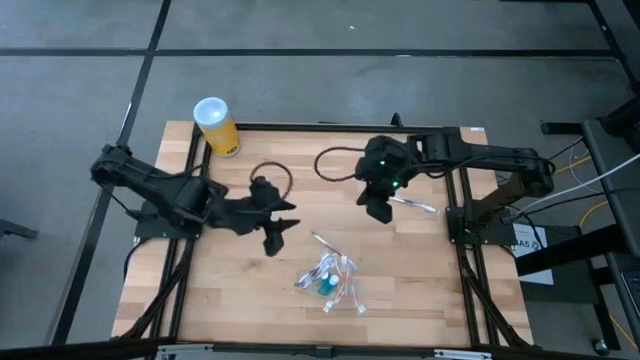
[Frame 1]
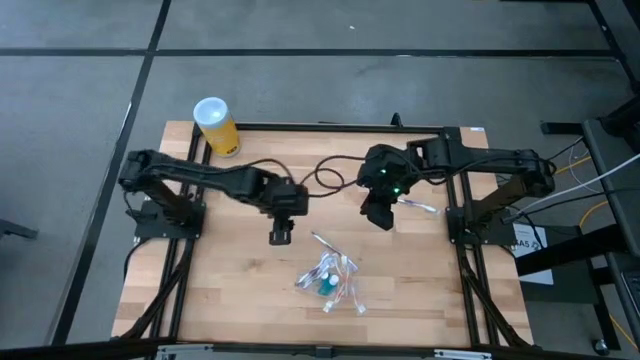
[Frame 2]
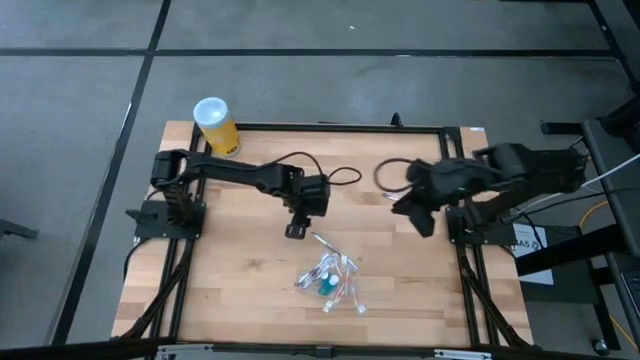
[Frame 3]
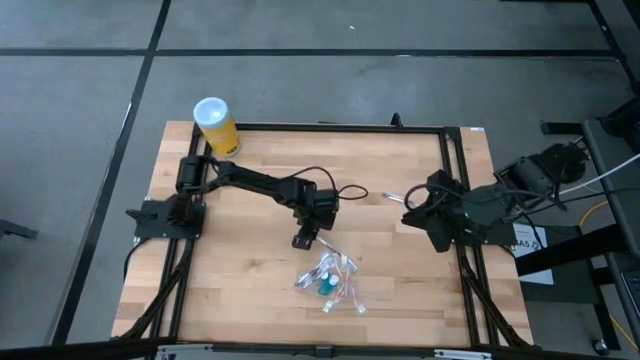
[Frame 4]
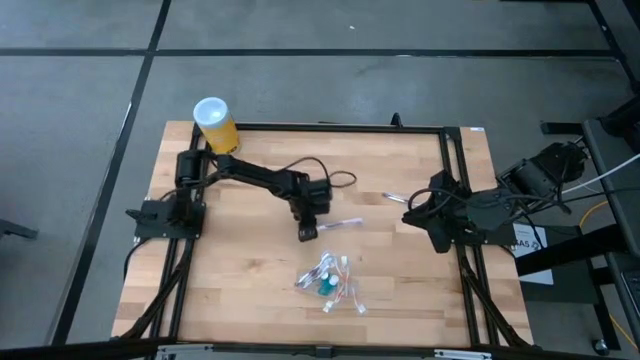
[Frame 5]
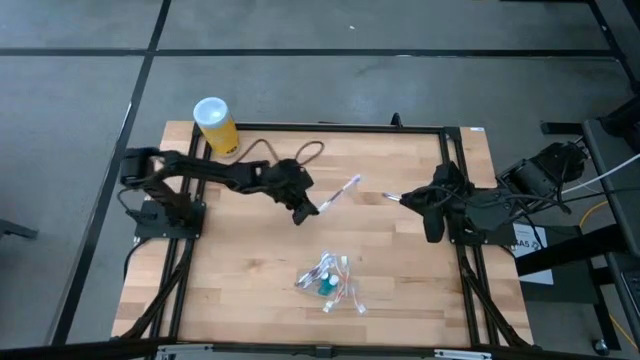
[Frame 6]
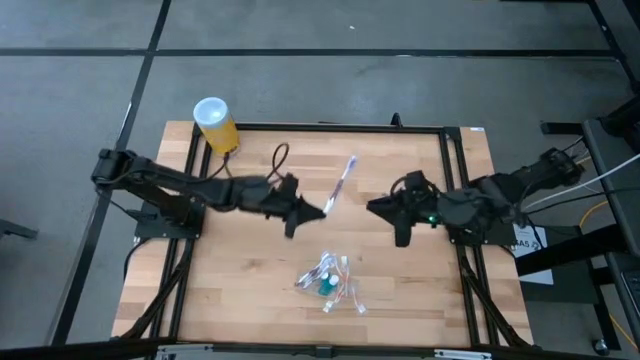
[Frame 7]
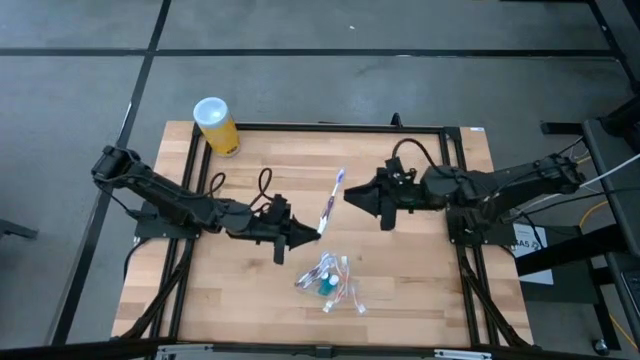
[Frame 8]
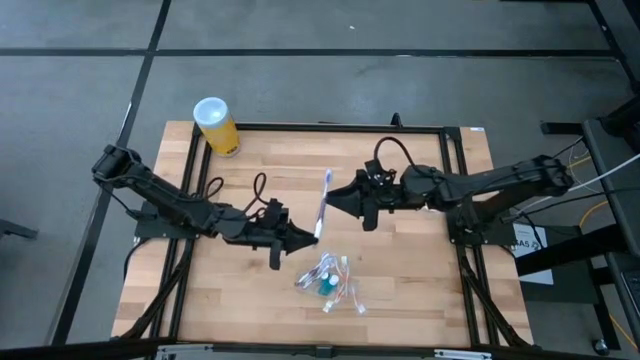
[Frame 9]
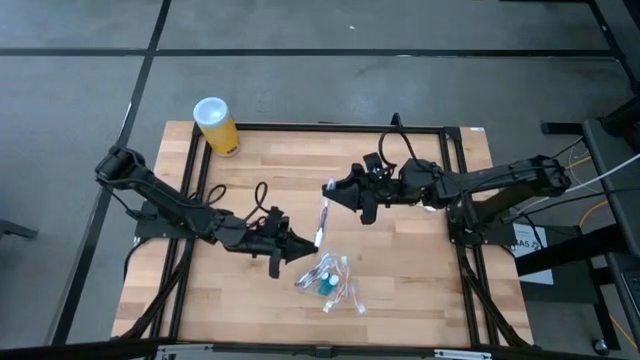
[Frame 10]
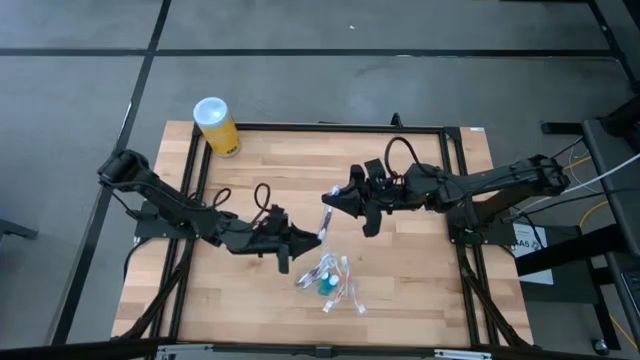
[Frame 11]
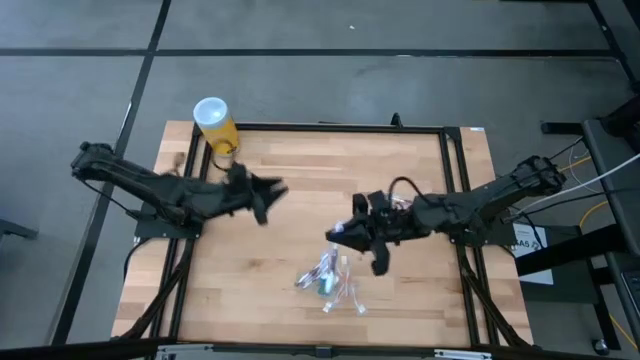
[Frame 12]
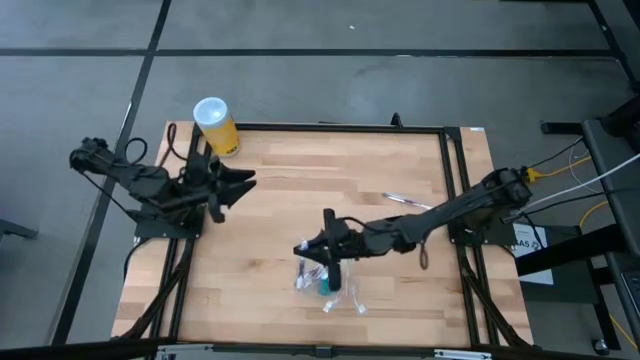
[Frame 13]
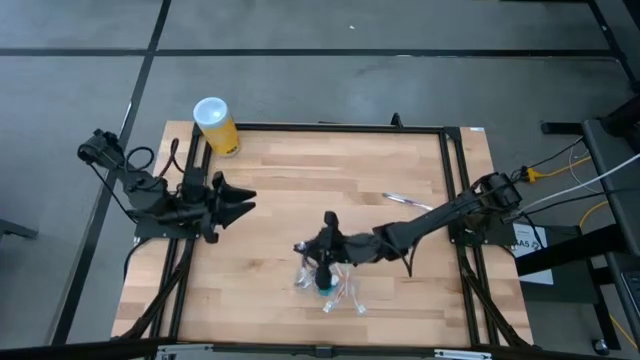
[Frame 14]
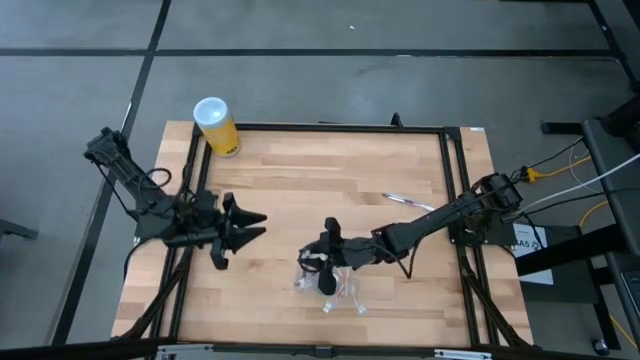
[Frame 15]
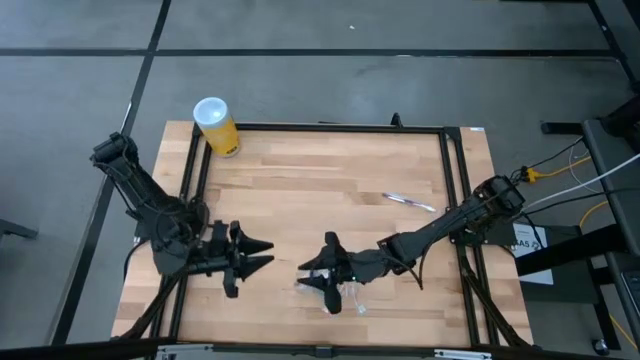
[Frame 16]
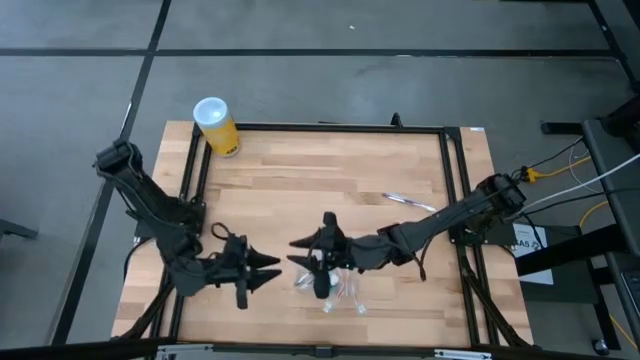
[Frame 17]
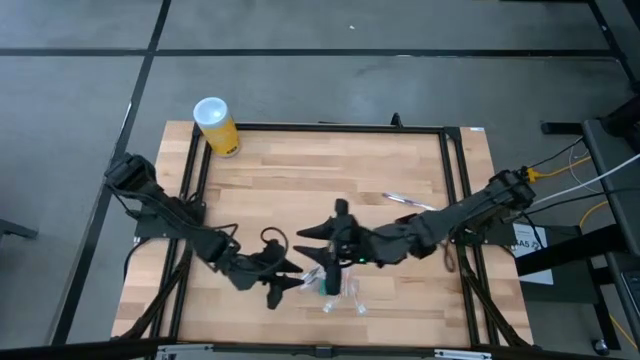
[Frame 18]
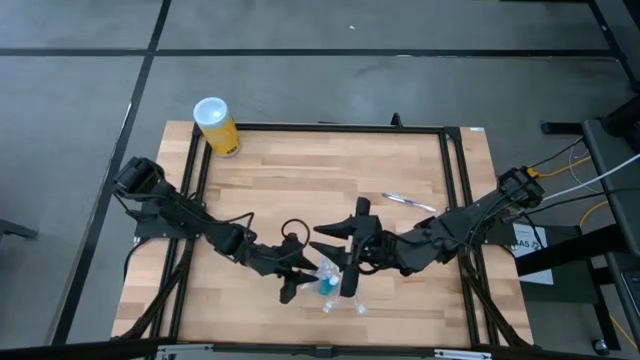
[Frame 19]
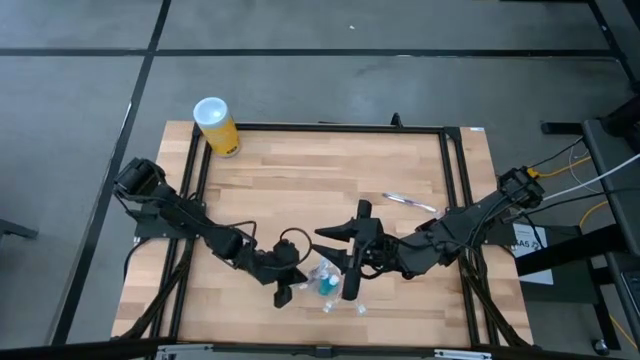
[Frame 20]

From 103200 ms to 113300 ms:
Task: Pick & Place toothbrushing station
Put the purple toothbrush into the left section of the transparent organizer

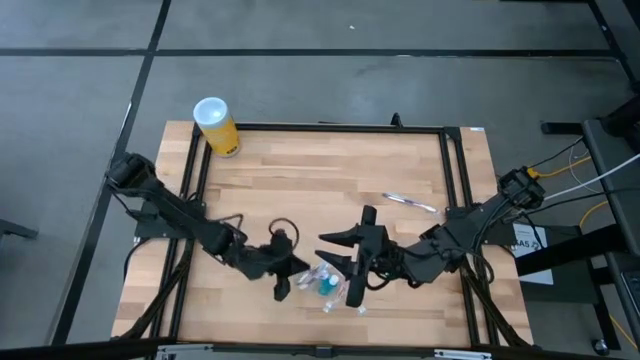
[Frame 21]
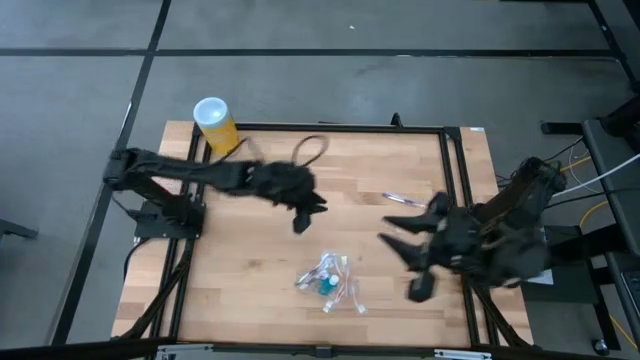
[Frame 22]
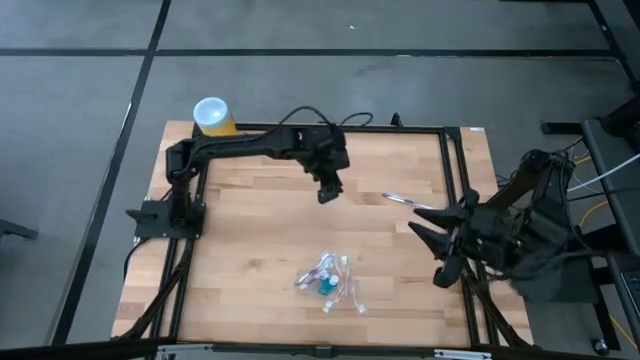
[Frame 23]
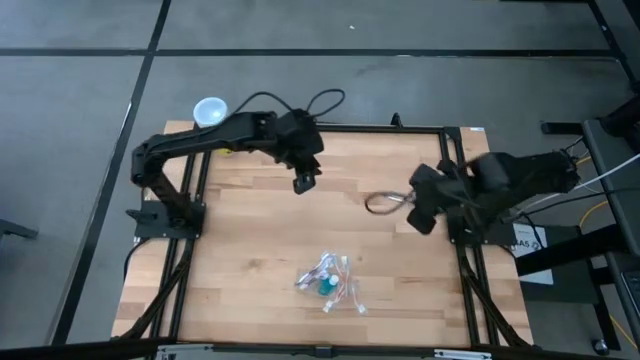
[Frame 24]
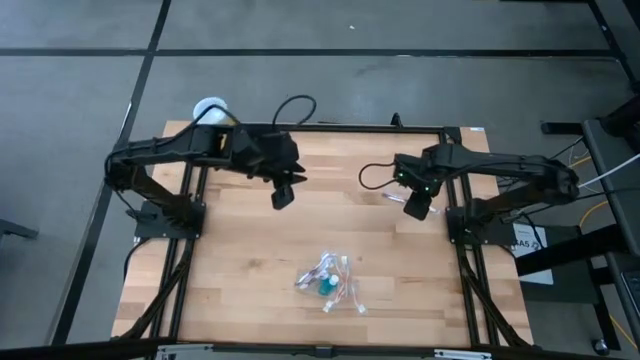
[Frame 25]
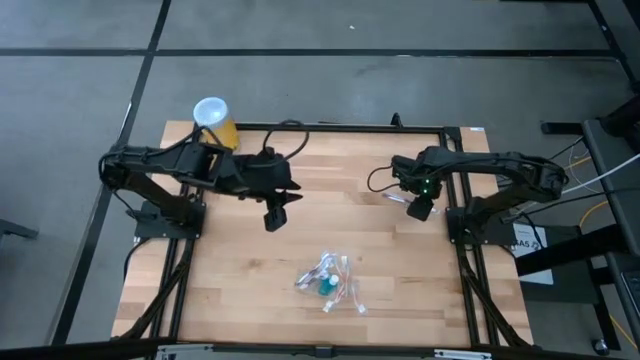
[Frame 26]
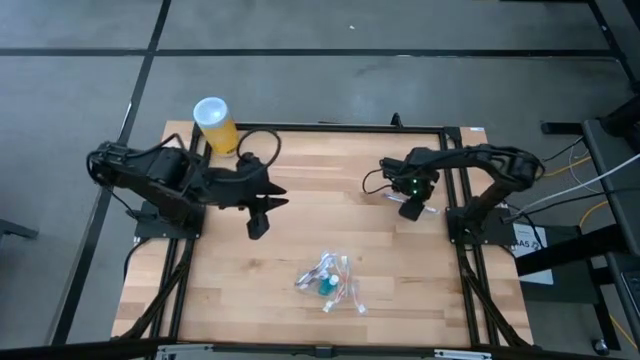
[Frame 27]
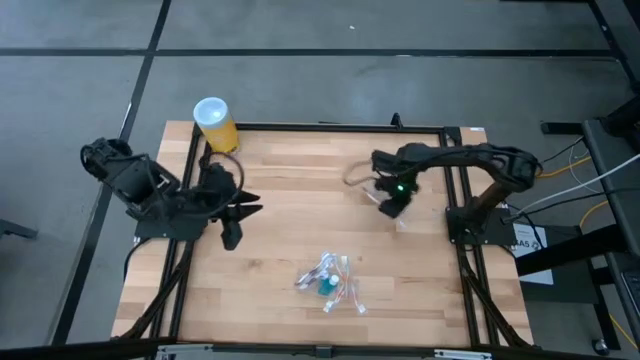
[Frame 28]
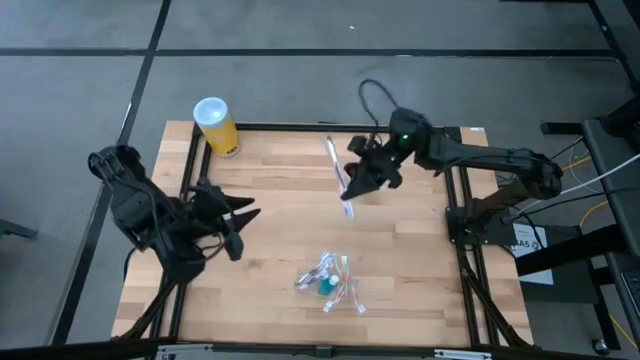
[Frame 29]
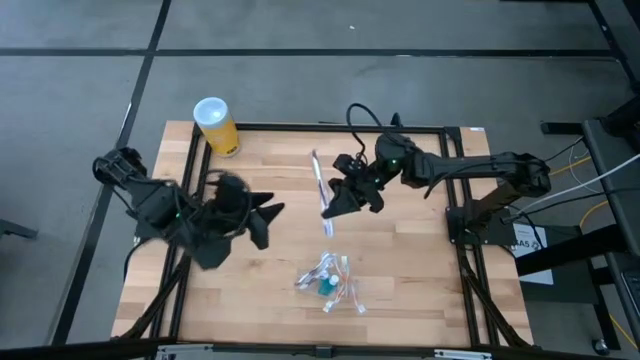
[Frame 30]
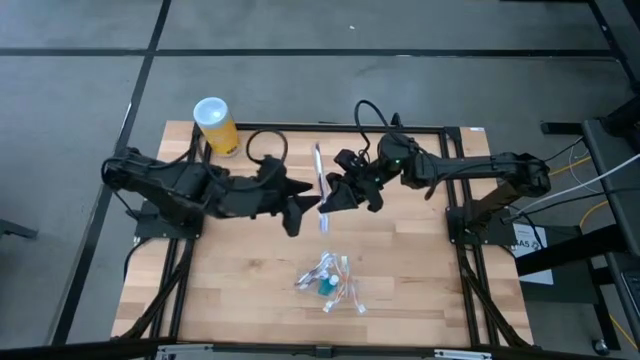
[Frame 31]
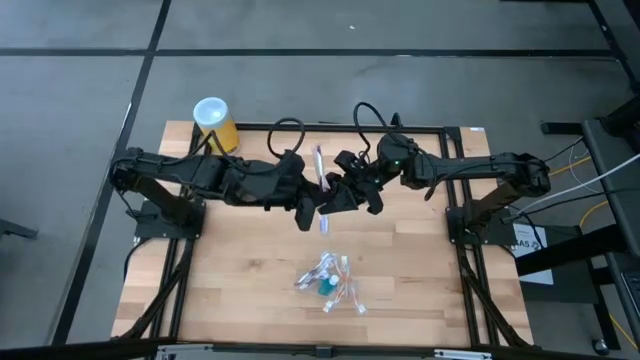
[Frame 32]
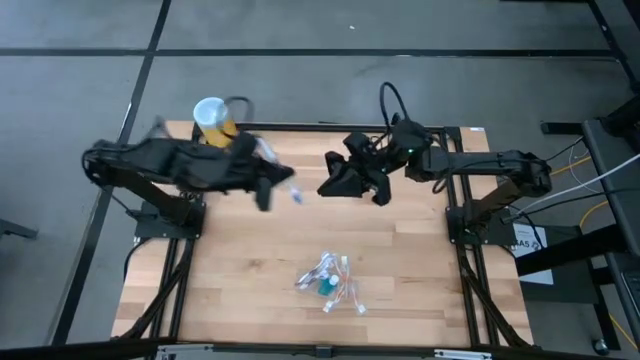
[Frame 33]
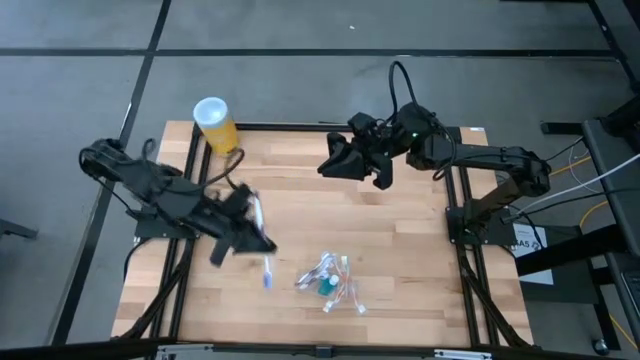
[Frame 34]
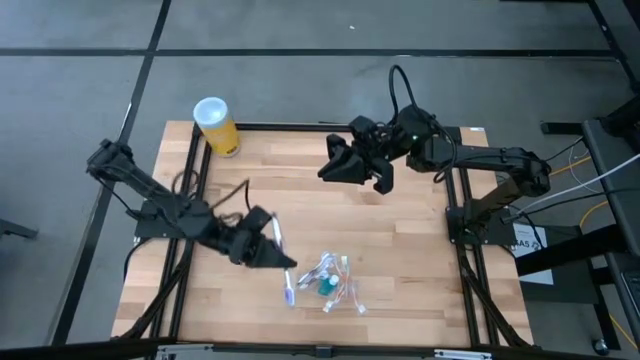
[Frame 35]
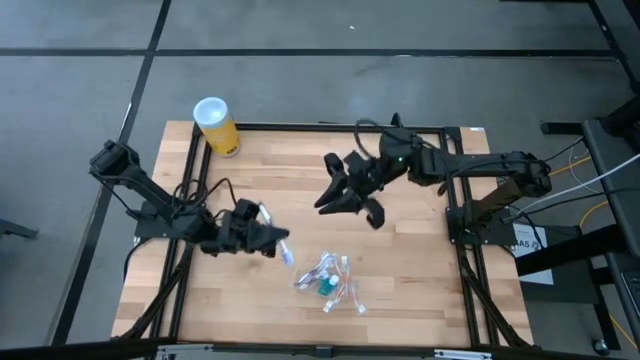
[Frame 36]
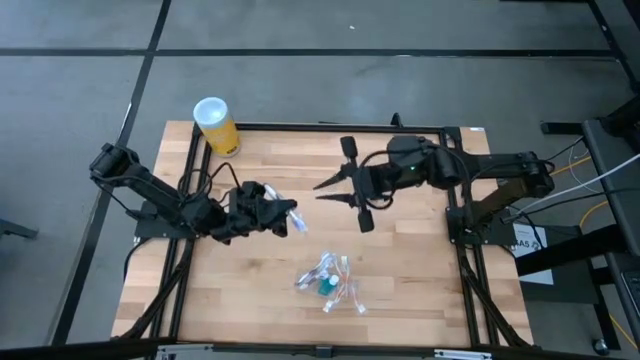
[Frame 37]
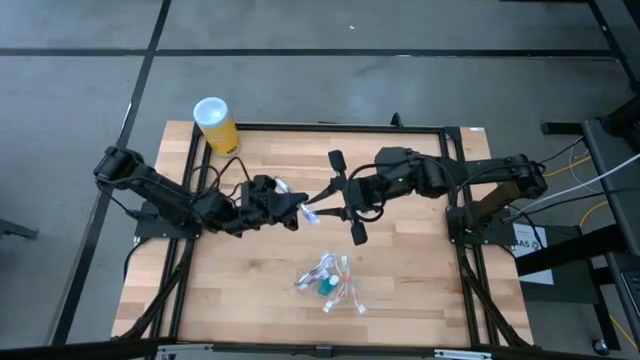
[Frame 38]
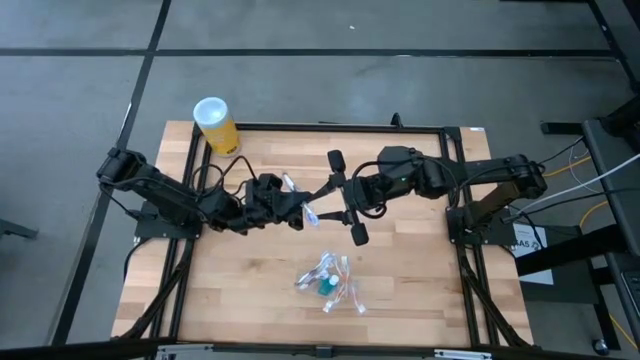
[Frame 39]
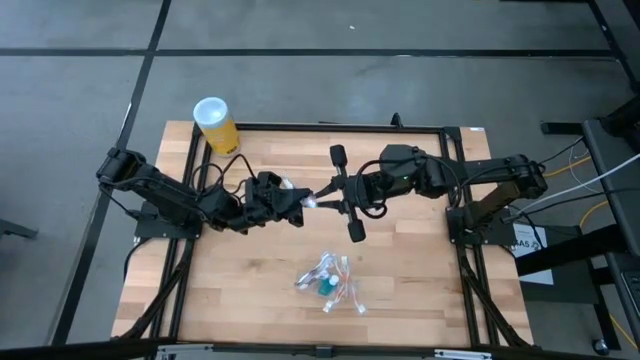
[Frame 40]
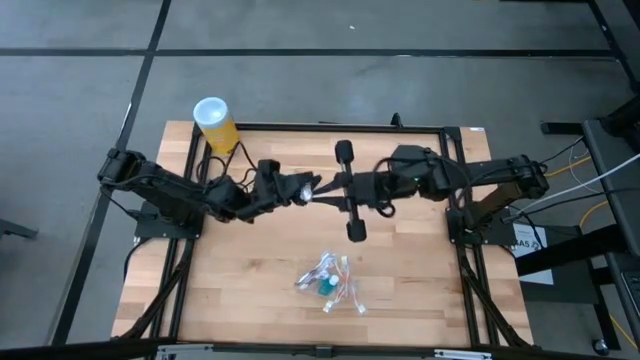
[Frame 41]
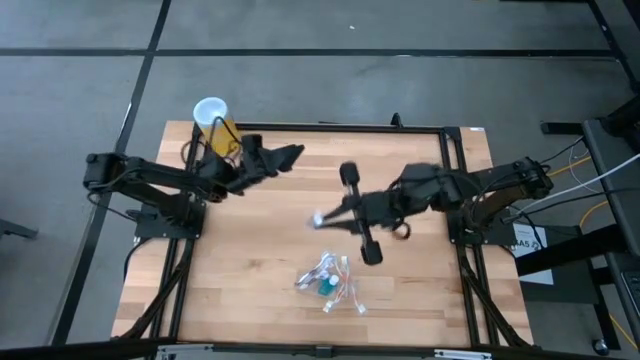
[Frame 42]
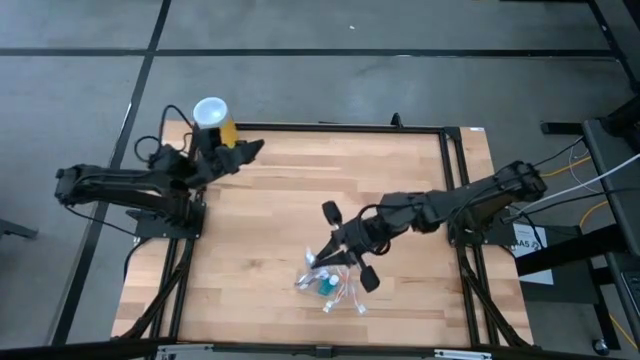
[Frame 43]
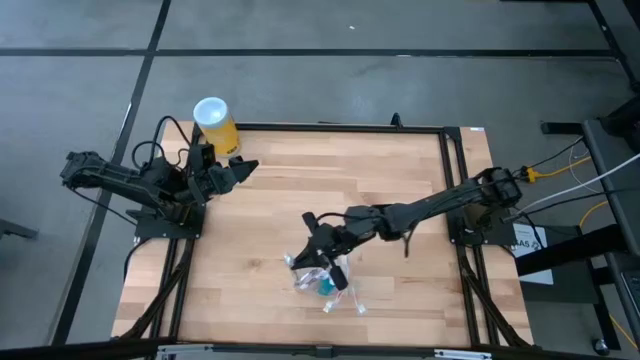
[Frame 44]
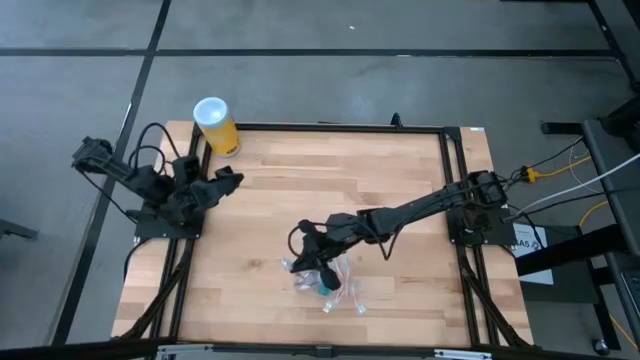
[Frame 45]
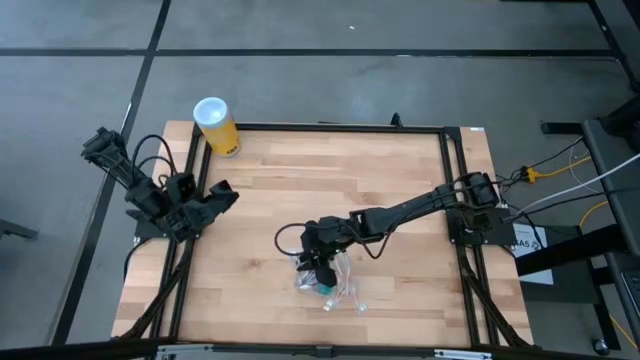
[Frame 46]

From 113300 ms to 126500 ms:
Put the purple toothbrush into the left section of the transparent organizer
